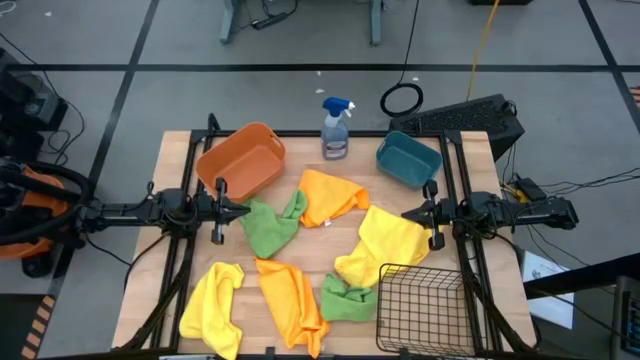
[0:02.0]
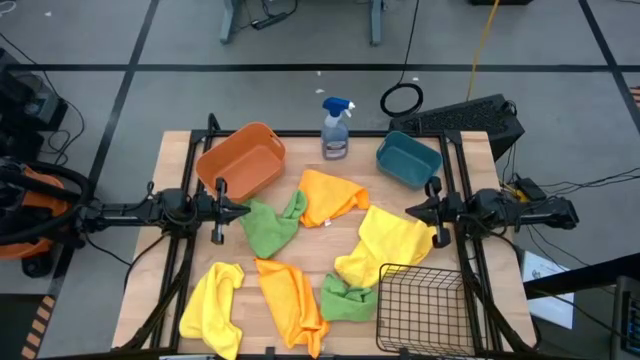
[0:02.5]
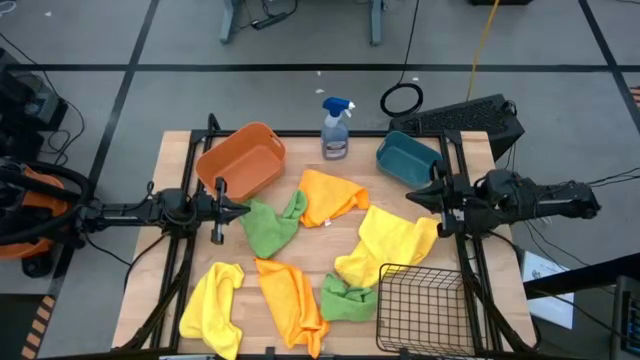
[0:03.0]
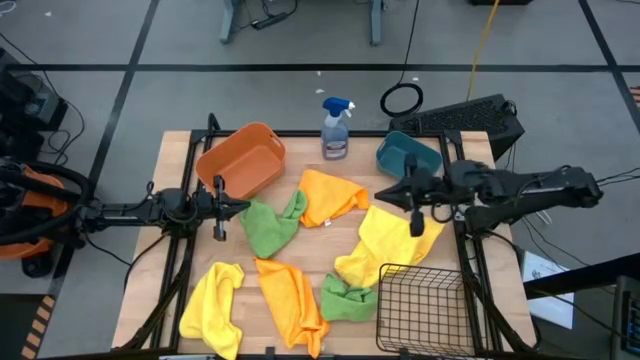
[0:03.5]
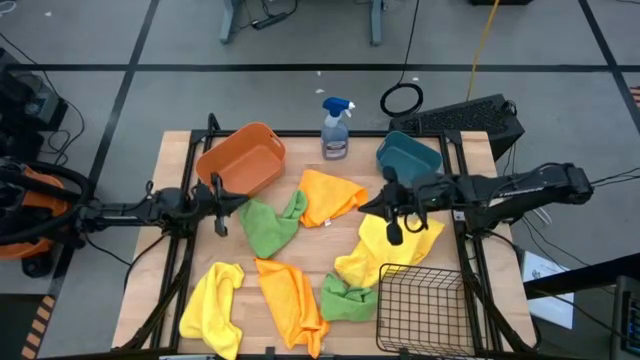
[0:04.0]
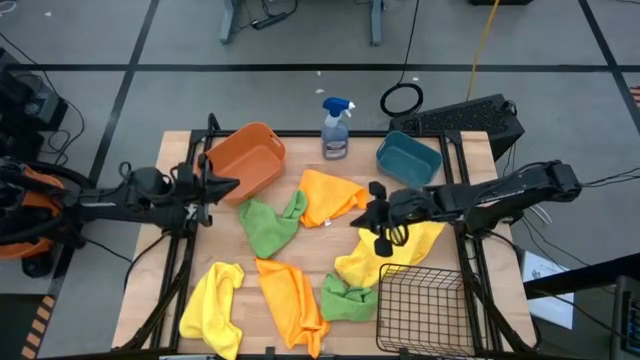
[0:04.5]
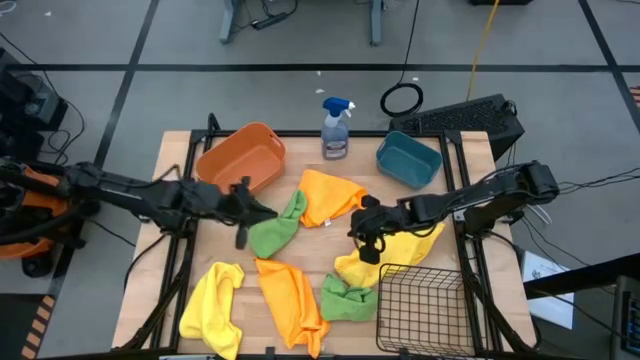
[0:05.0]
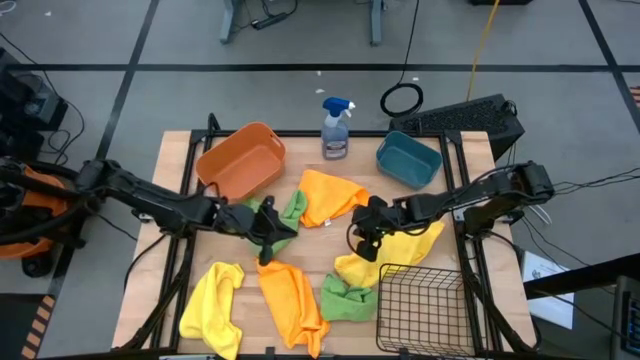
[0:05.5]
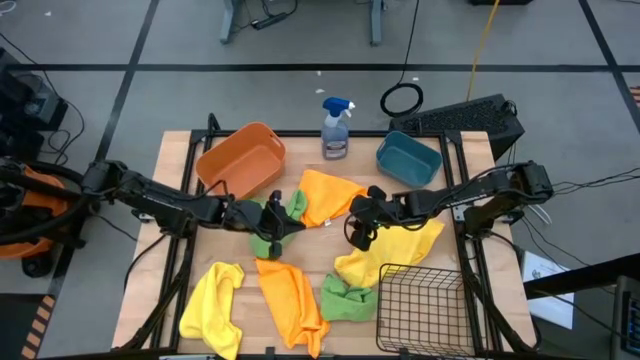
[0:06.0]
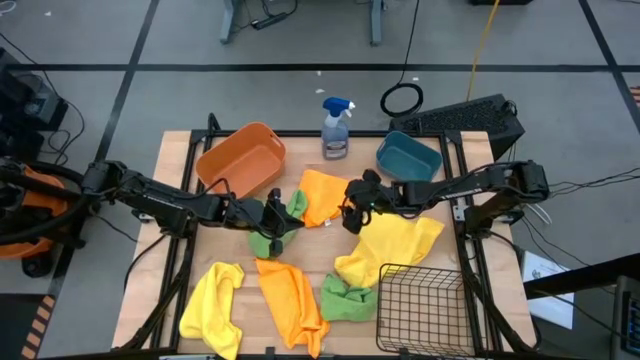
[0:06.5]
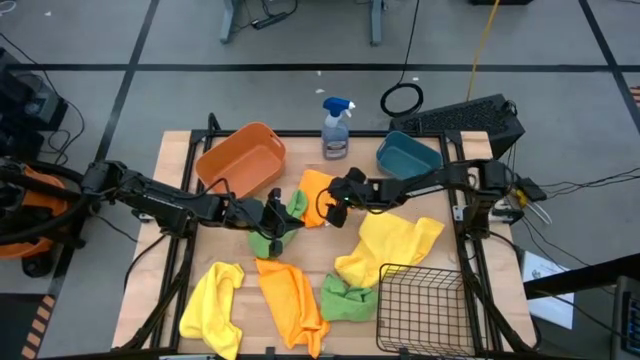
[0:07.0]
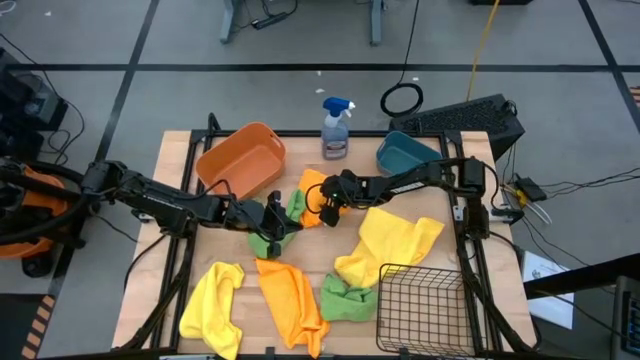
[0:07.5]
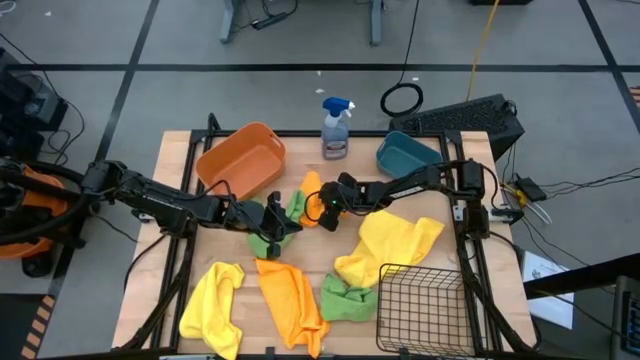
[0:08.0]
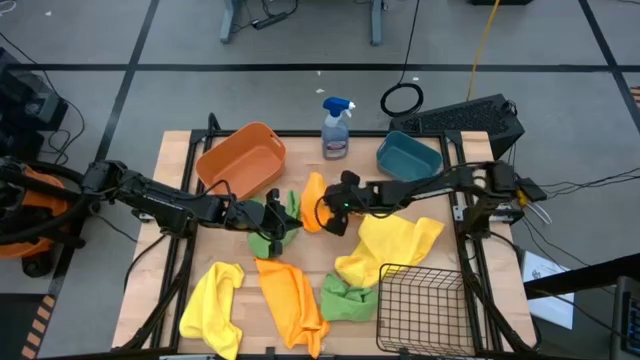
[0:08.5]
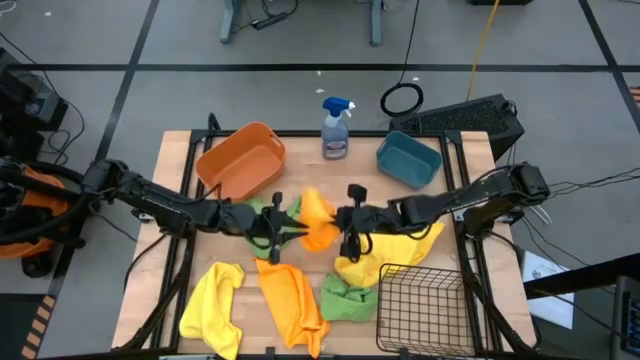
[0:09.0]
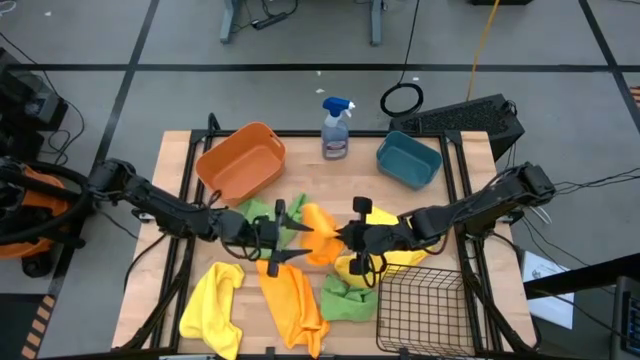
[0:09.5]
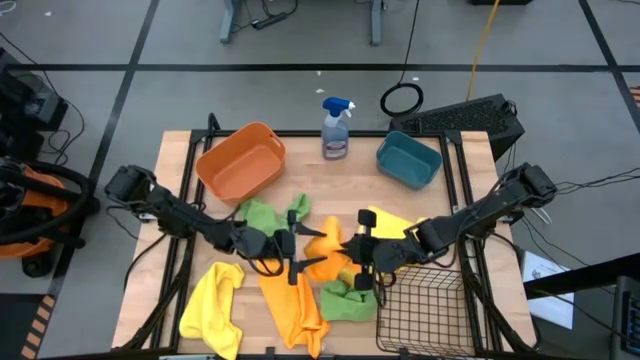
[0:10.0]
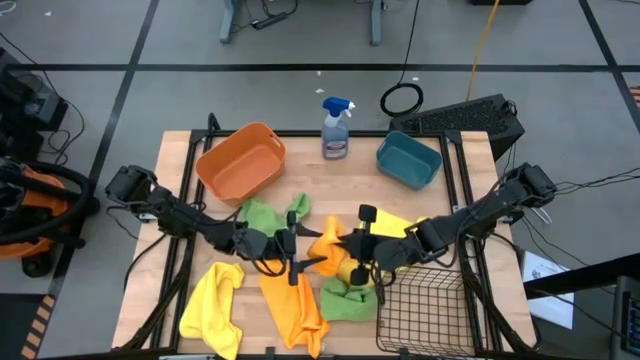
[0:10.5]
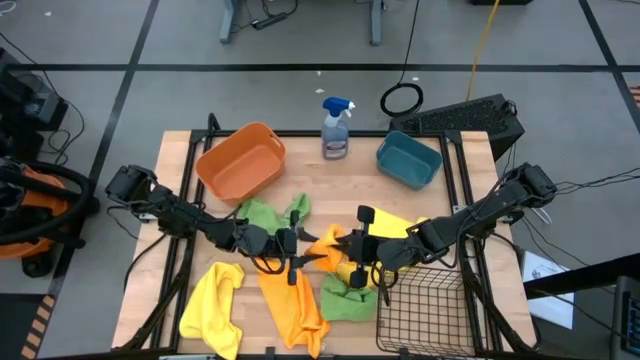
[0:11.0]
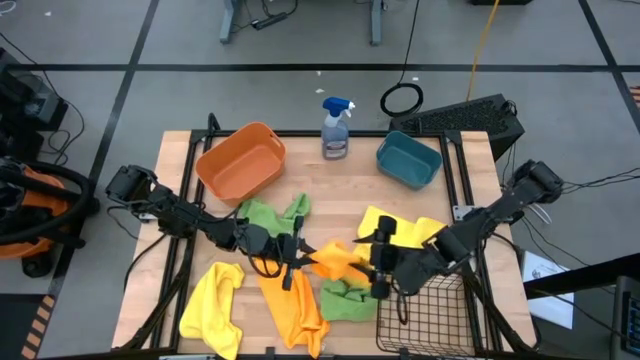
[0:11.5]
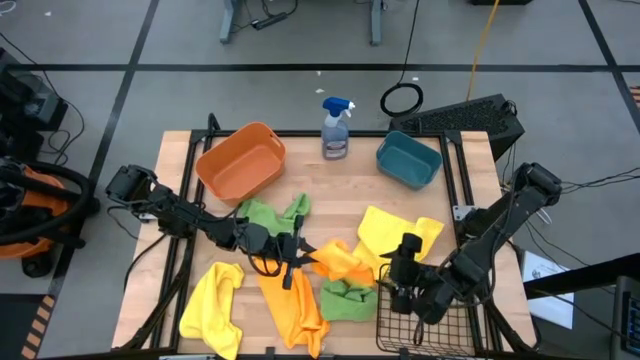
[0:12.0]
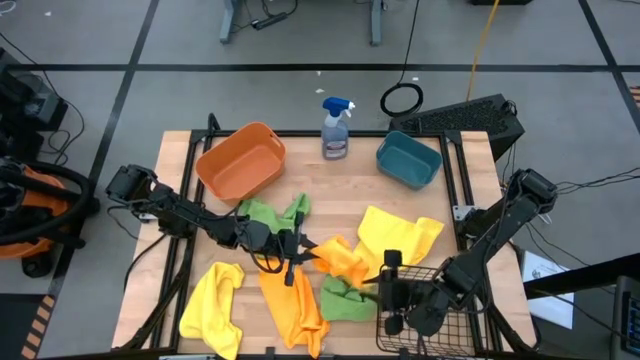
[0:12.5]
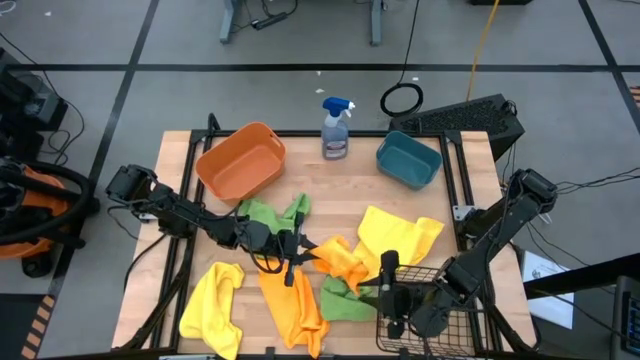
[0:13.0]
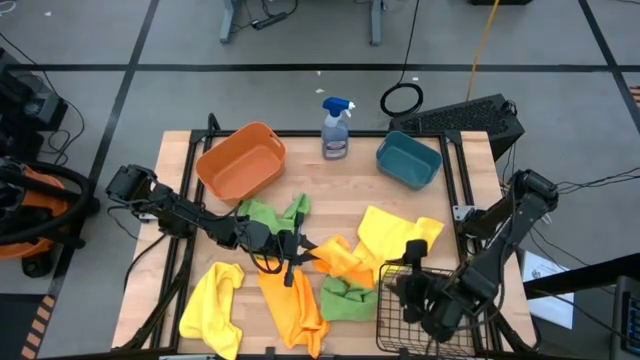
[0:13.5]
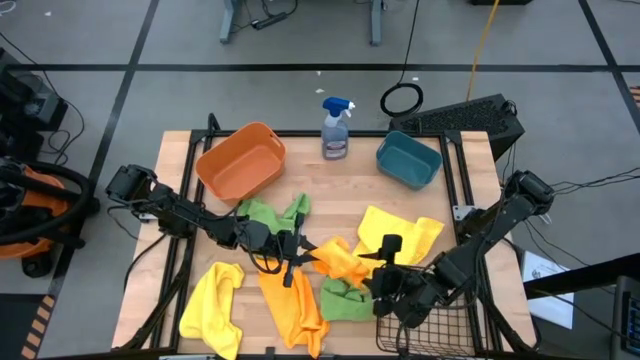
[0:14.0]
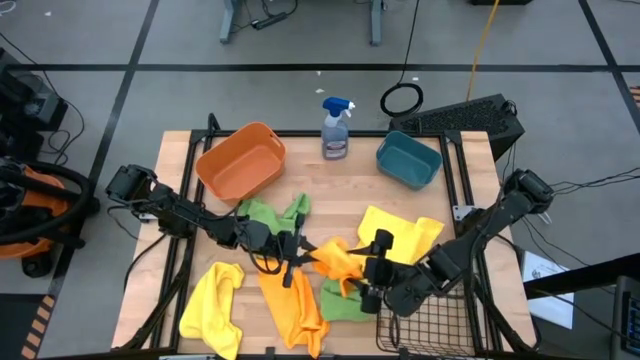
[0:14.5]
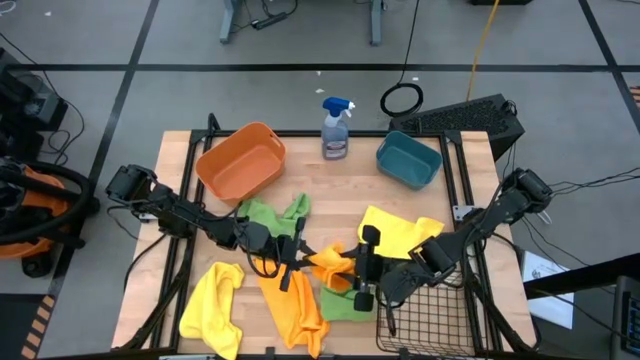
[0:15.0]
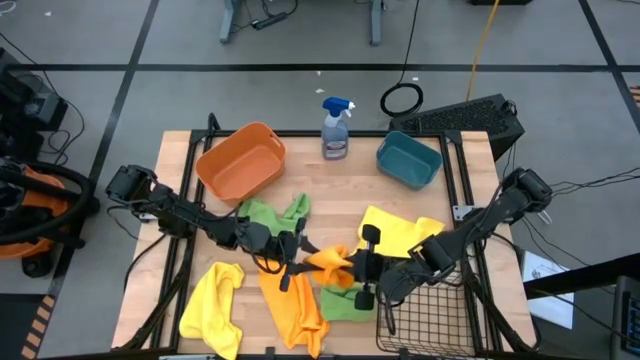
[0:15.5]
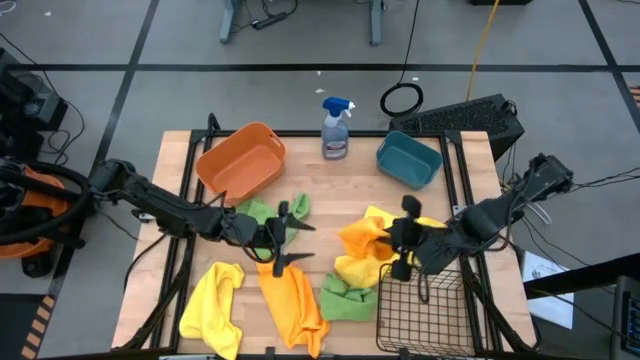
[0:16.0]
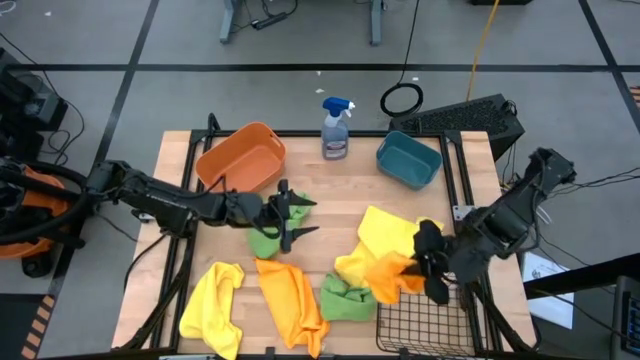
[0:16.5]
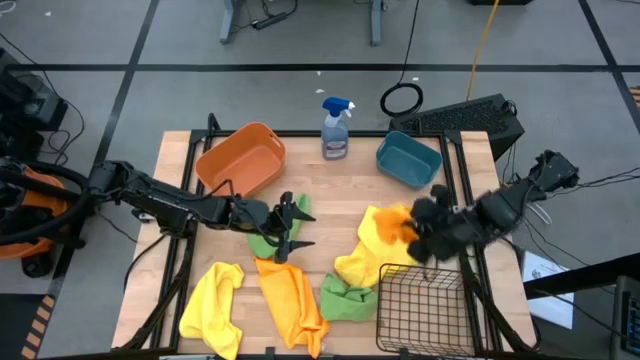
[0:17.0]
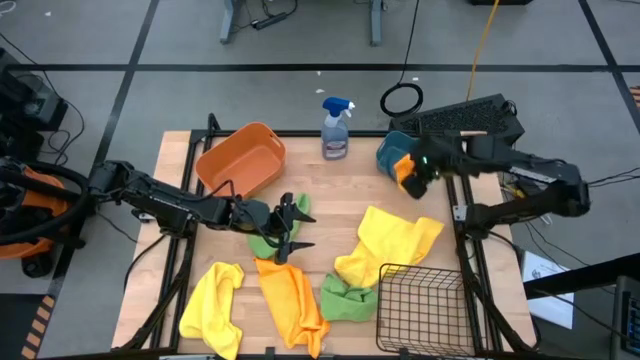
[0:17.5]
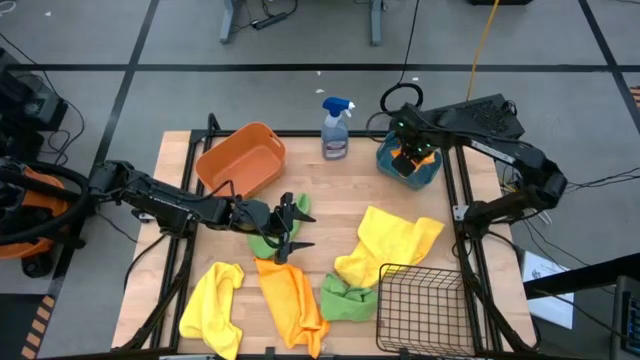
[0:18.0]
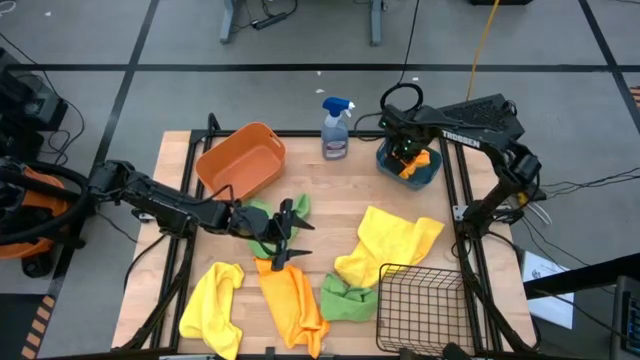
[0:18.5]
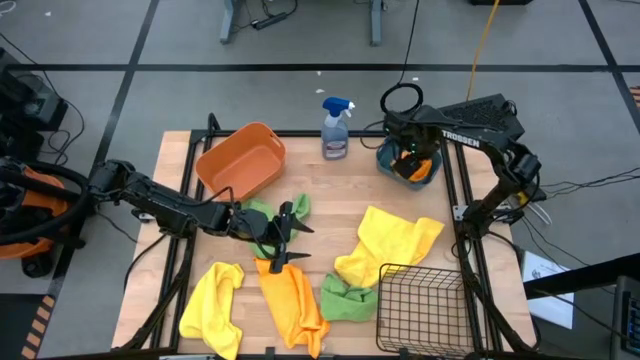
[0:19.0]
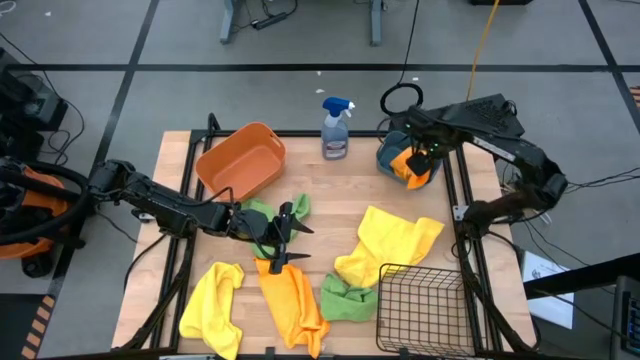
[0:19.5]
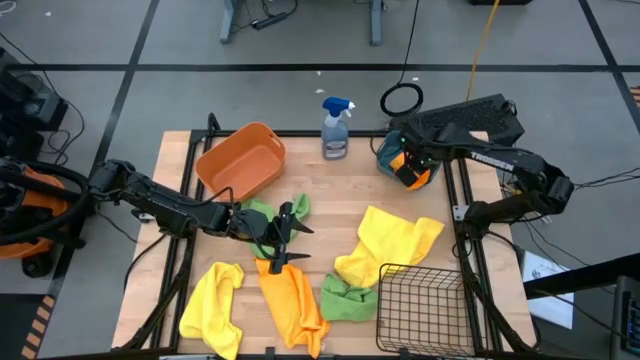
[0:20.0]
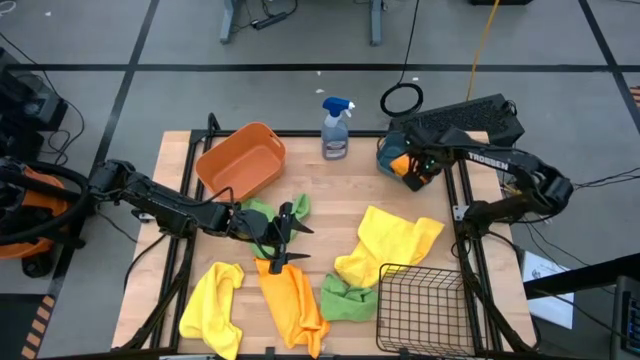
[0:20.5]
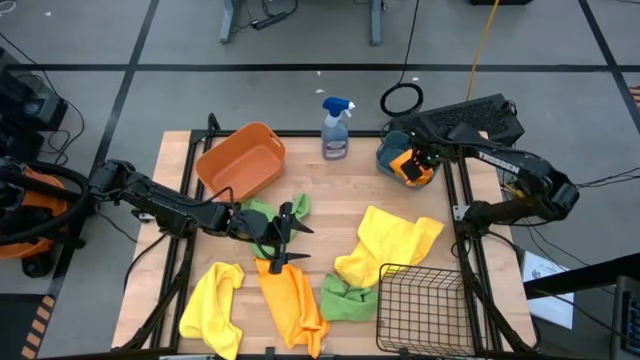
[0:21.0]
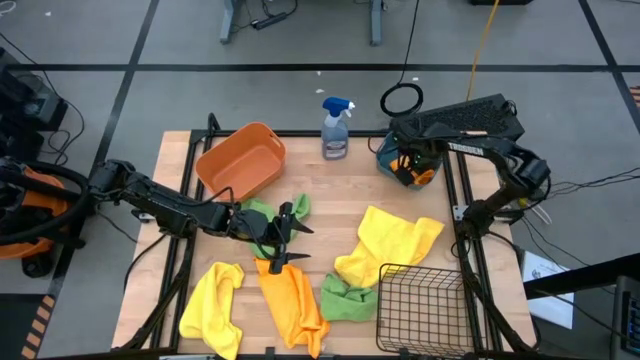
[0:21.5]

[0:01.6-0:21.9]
Task: Sort microfiber towel by color & place in baskets
Put the top center orange microfiber towel into the blue bin
